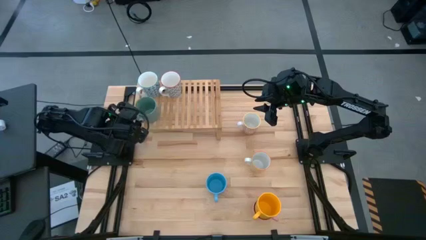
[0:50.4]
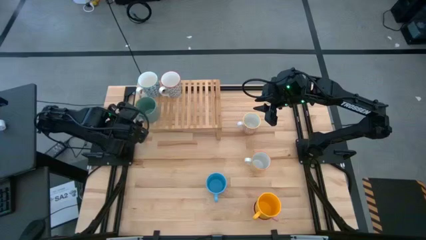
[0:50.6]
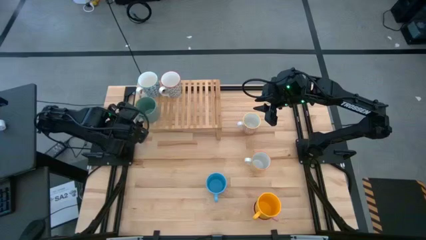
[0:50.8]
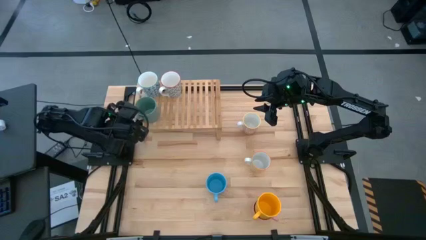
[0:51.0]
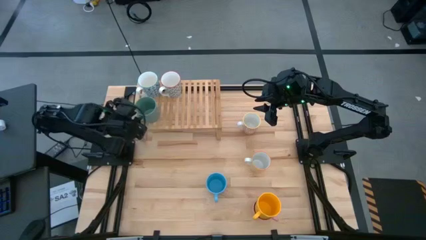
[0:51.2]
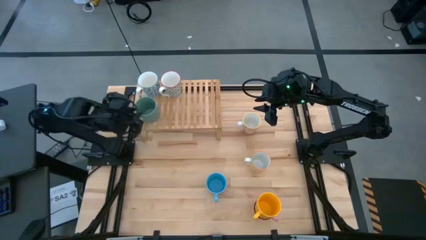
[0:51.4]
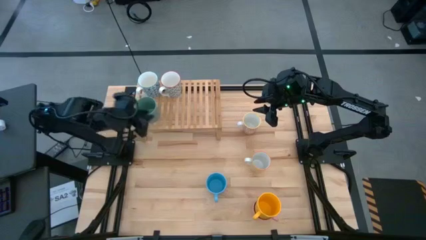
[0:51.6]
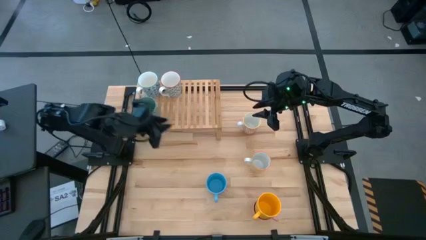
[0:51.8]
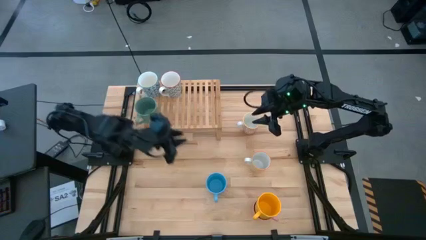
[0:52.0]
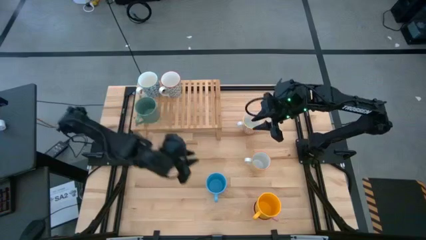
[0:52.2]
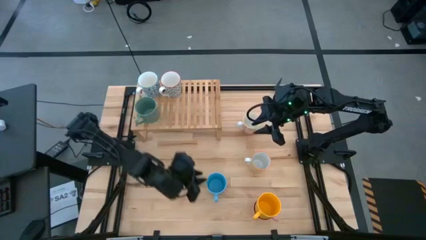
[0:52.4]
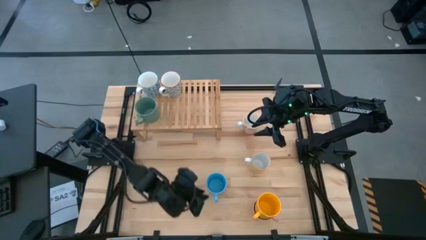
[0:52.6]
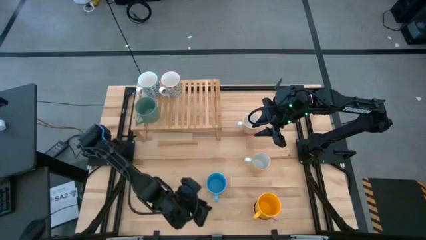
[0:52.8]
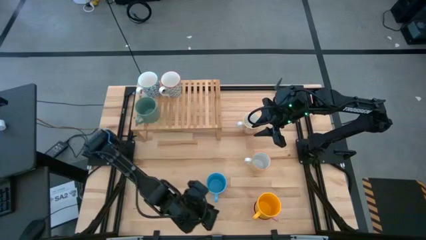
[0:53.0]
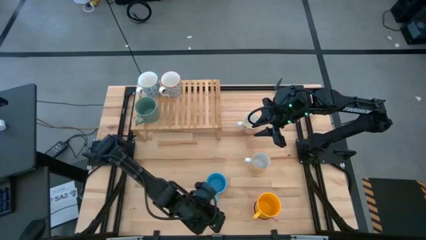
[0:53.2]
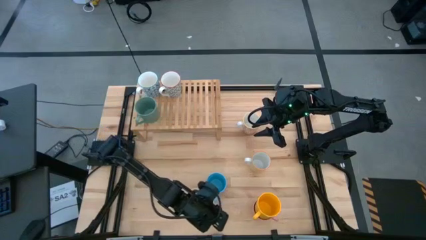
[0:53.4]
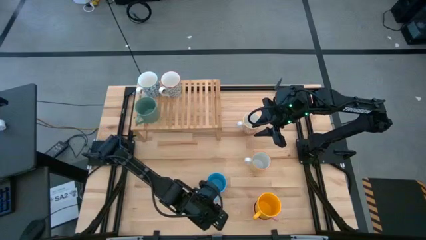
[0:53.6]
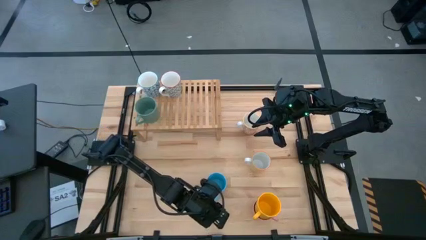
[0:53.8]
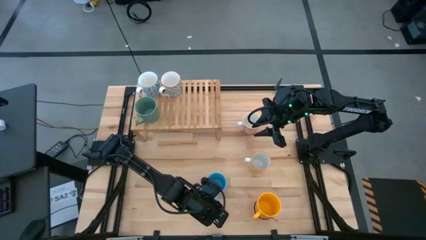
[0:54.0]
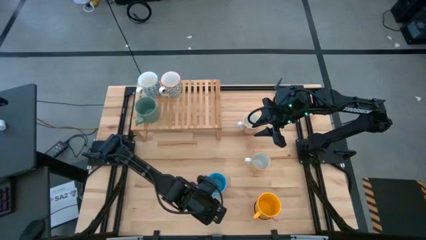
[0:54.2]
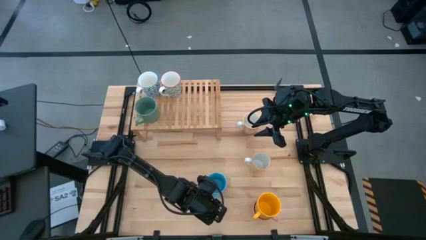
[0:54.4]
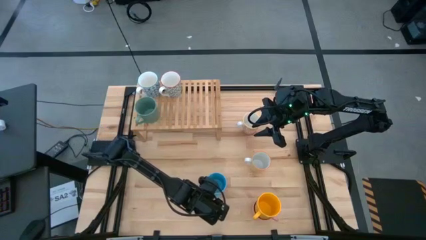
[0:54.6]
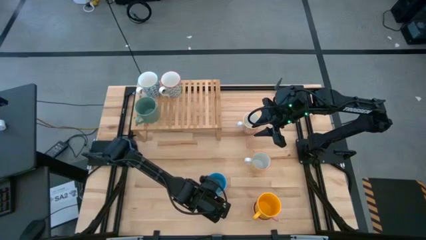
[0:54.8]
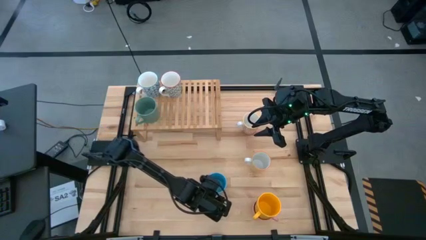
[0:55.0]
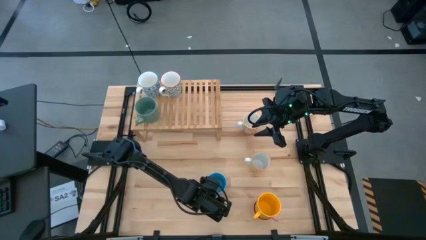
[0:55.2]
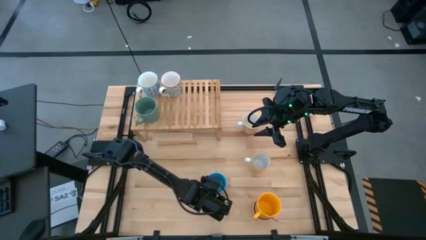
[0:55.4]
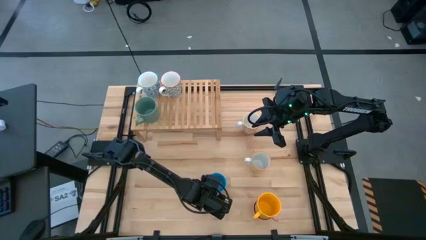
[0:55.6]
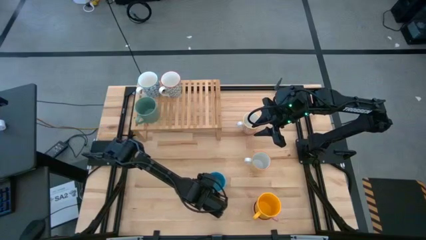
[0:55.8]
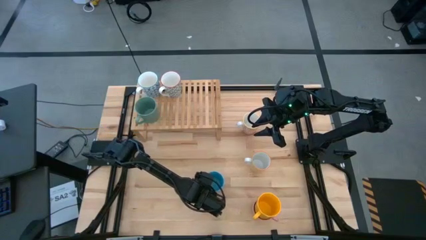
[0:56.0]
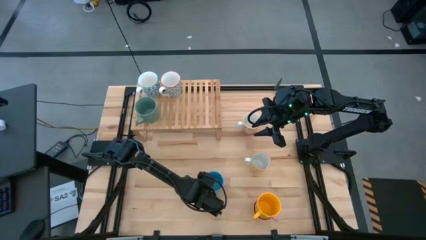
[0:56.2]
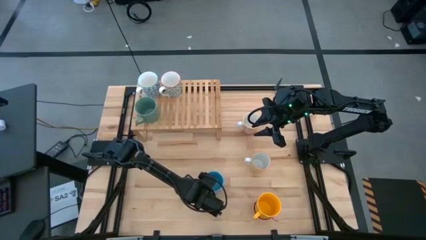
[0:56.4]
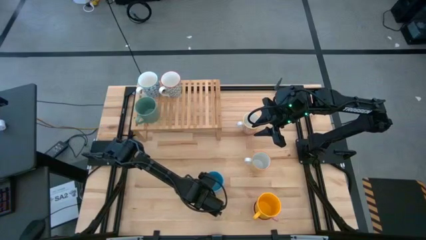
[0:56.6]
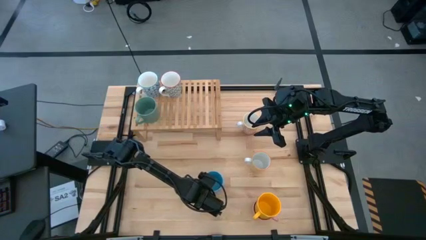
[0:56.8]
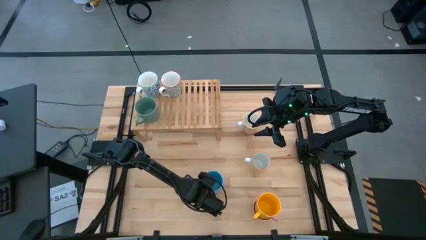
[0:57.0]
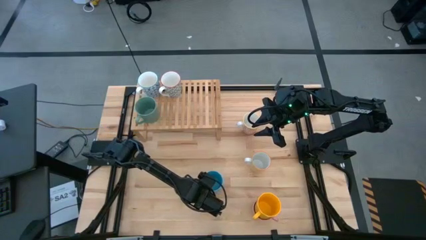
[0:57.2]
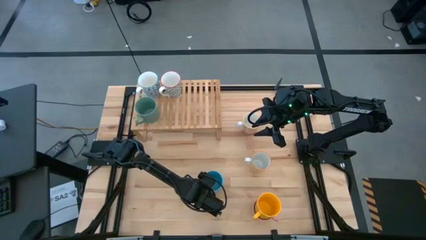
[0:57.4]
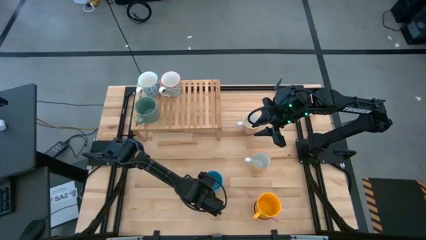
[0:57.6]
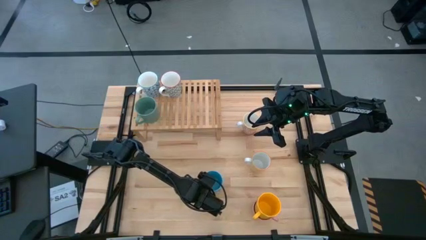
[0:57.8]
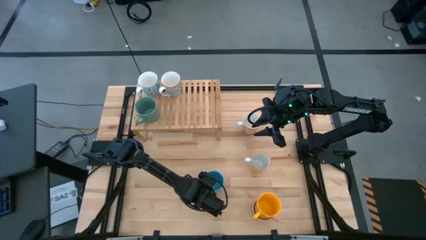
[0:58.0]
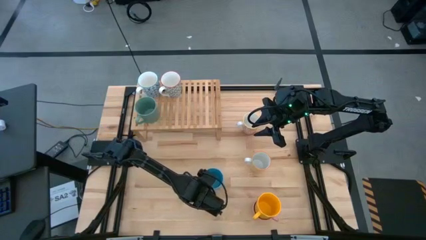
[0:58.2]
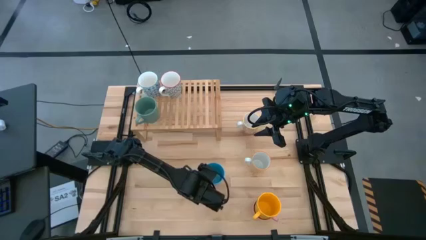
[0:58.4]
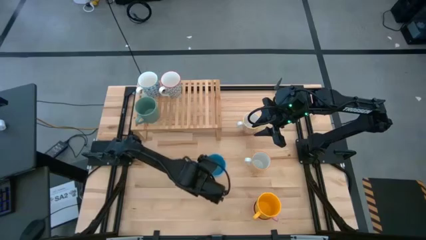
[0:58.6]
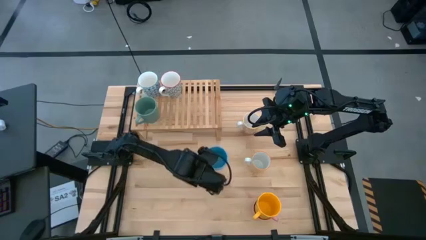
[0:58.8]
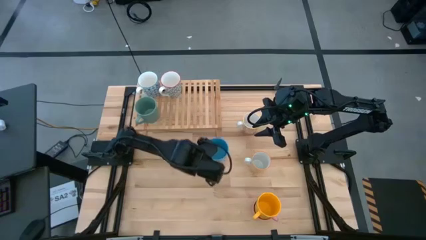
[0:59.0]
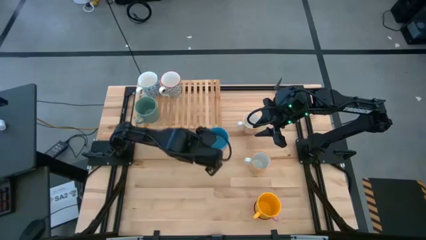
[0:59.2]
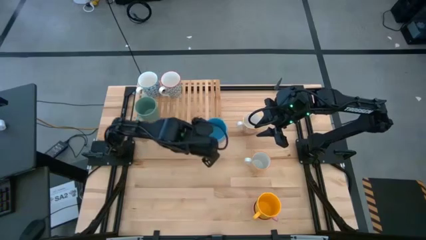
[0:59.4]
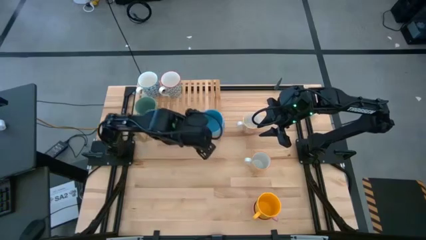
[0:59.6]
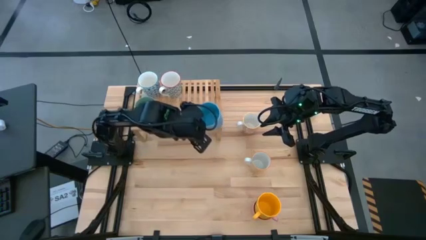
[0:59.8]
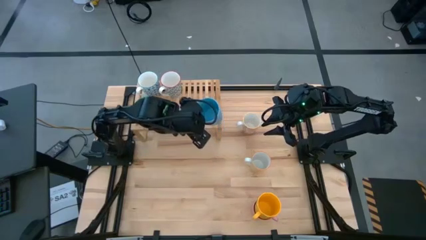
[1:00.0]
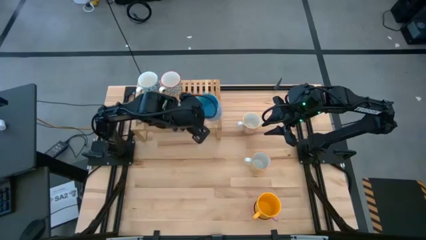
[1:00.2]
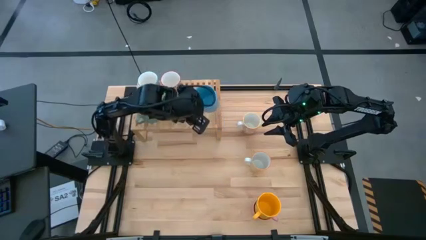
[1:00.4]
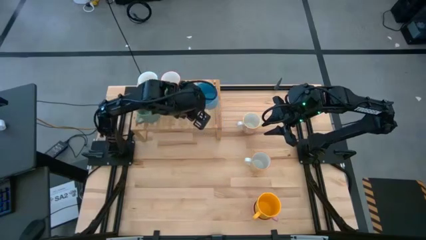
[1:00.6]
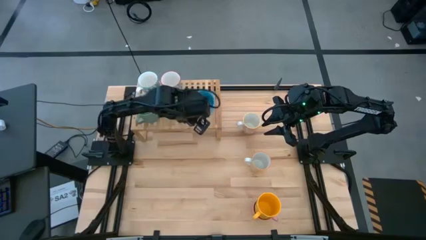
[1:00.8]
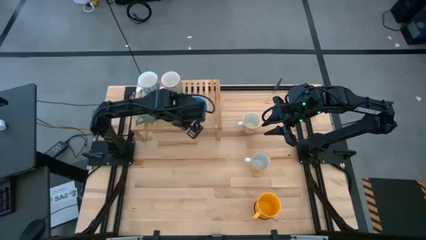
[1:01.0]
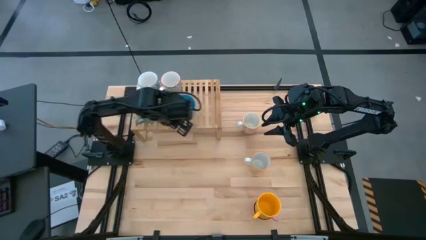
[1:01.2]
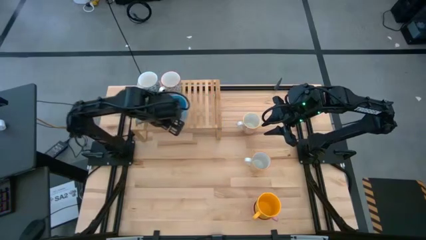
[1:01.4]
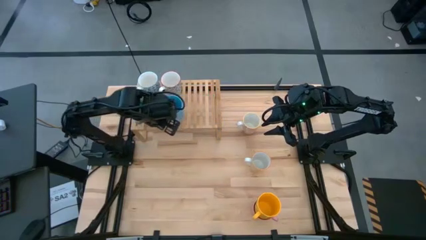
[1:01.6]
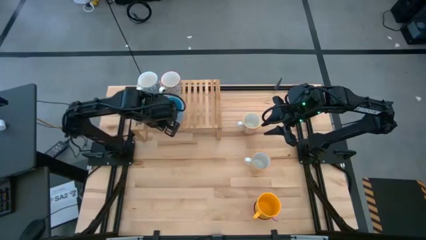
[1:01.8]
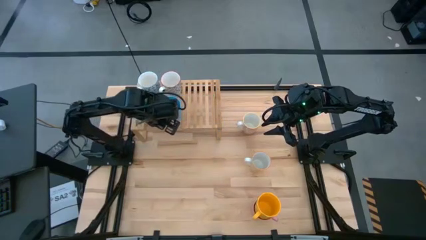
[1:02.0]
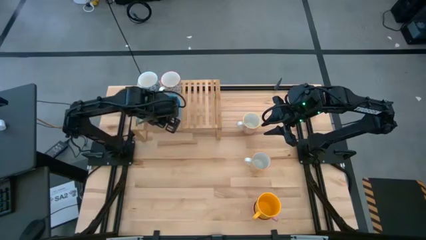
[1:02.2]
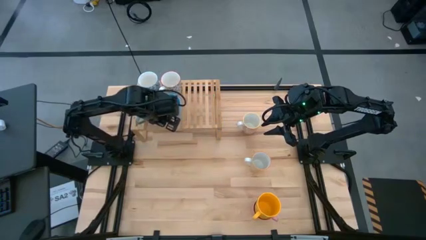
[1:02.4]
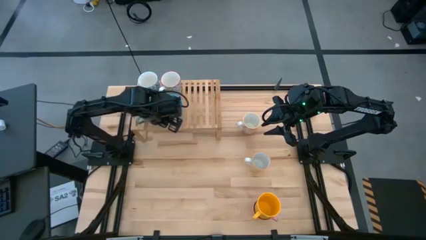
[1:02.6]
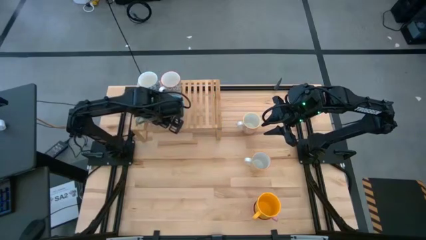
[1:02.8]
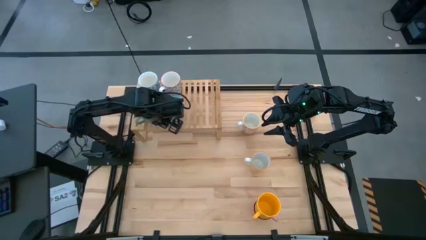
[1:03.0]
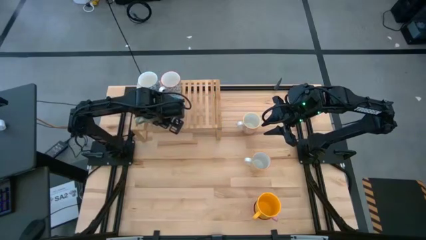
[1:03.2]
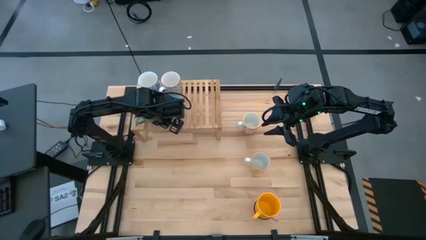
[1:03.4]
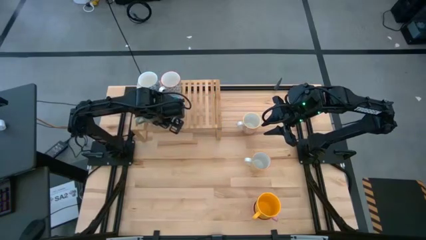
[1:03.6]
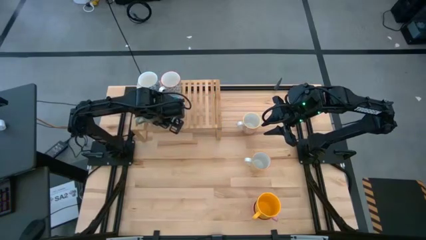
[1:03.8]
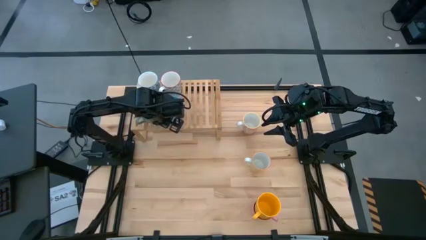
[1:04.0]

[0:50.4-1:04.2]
Task: Place coffee mugs
Put the blue mug on the shelf
